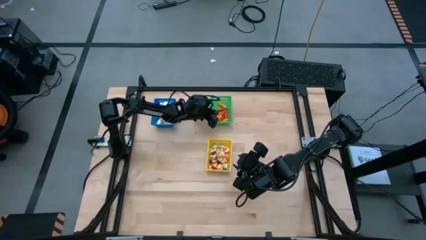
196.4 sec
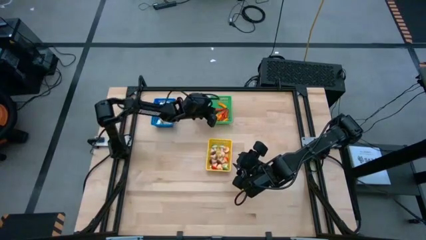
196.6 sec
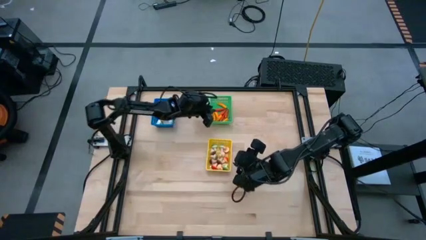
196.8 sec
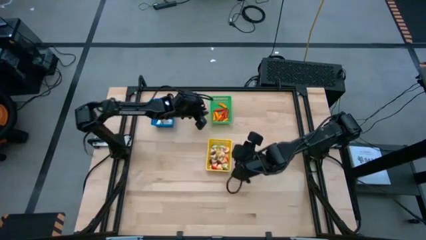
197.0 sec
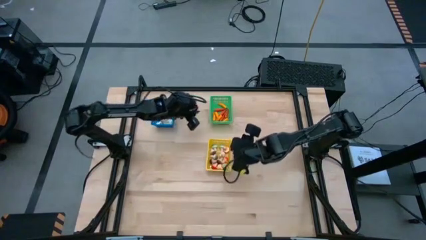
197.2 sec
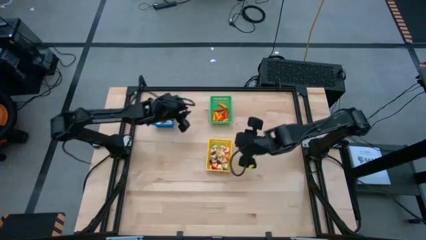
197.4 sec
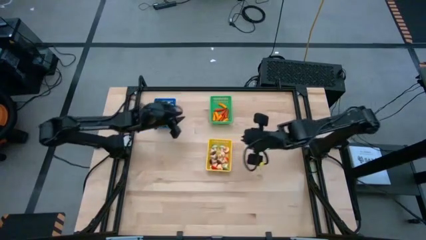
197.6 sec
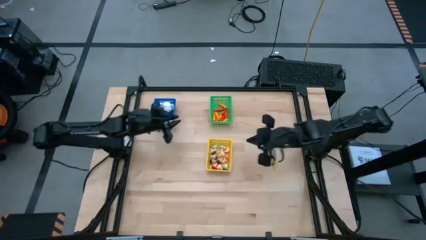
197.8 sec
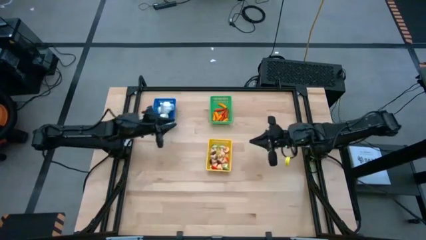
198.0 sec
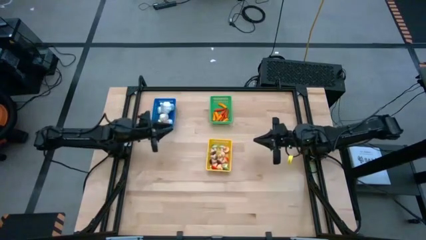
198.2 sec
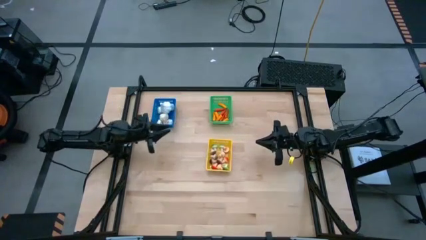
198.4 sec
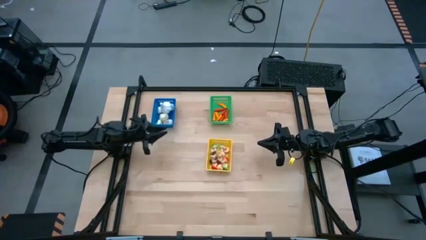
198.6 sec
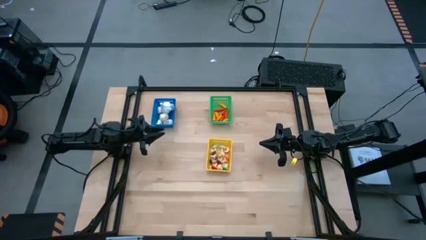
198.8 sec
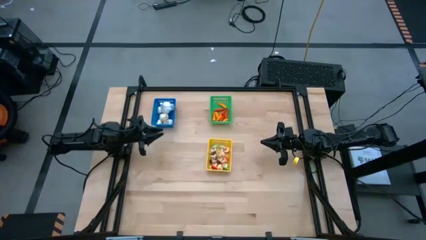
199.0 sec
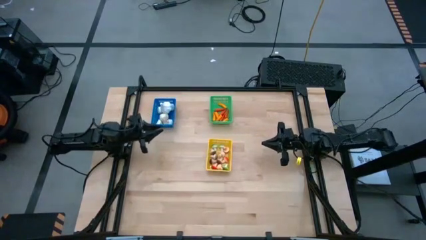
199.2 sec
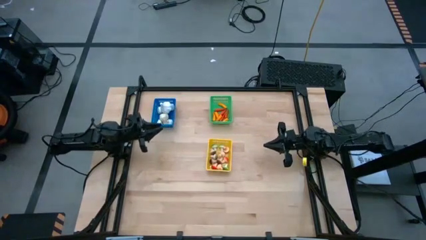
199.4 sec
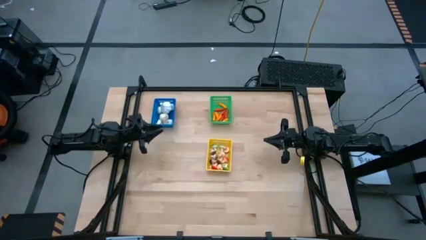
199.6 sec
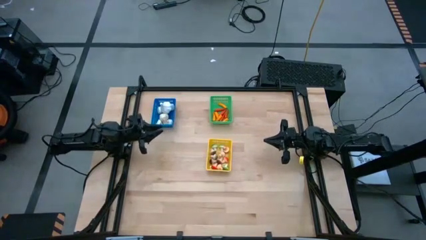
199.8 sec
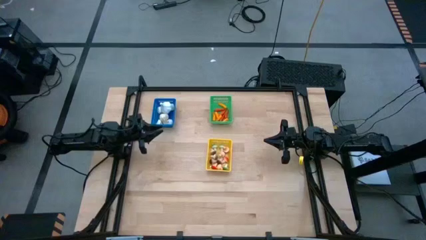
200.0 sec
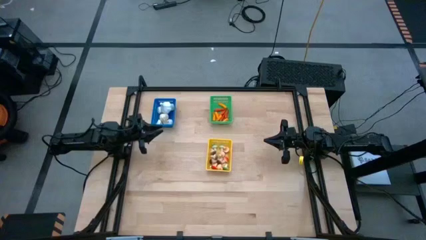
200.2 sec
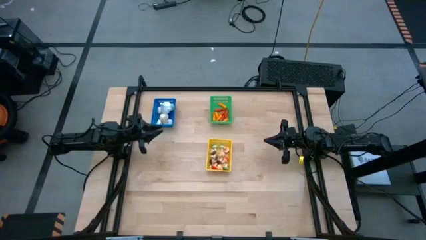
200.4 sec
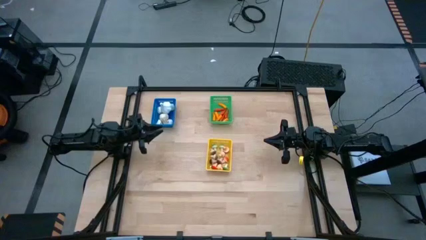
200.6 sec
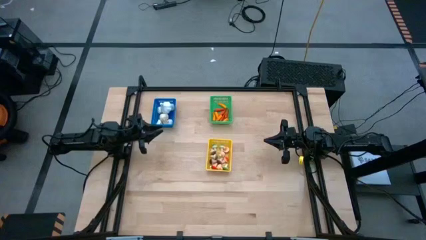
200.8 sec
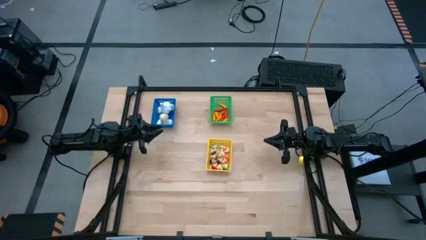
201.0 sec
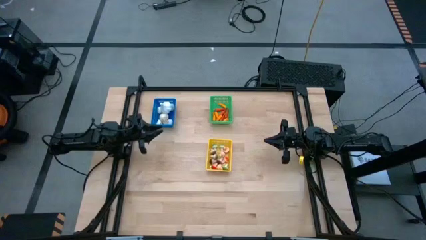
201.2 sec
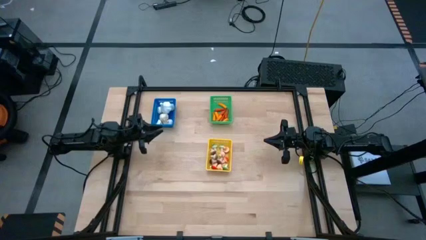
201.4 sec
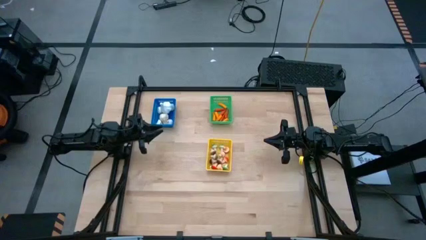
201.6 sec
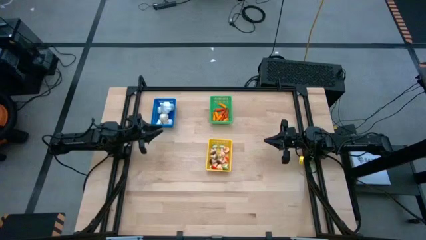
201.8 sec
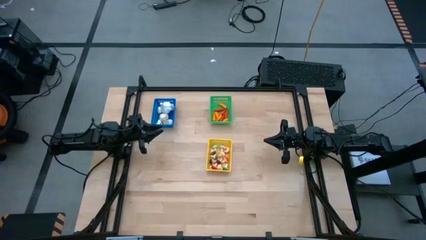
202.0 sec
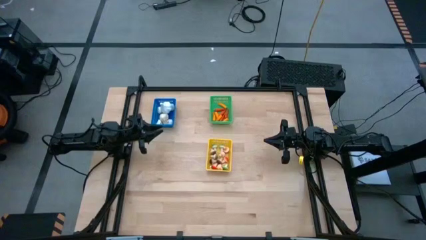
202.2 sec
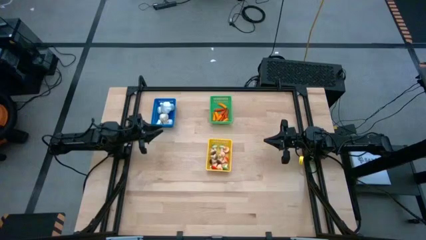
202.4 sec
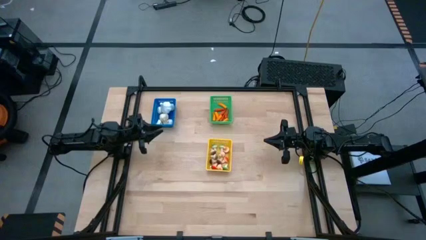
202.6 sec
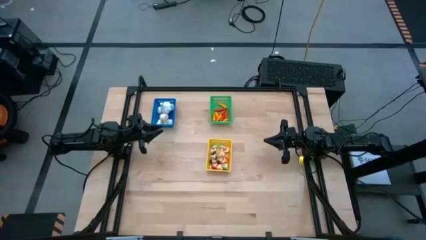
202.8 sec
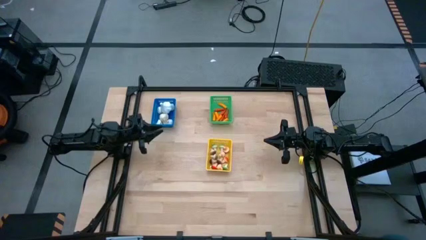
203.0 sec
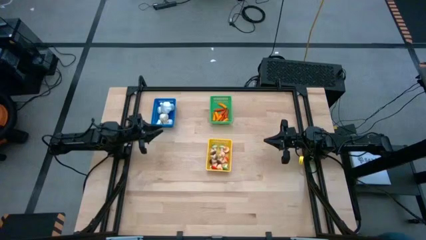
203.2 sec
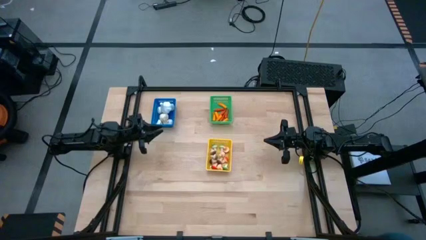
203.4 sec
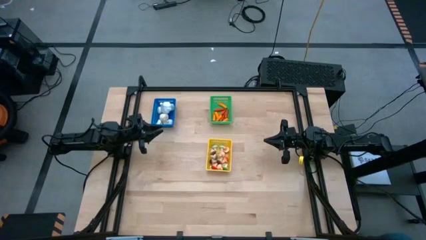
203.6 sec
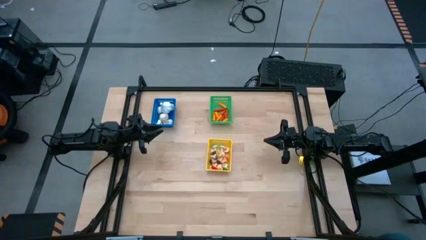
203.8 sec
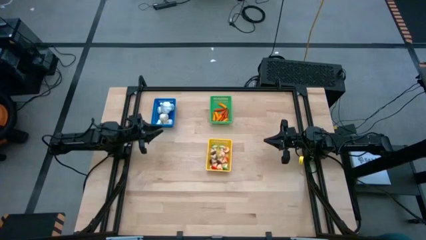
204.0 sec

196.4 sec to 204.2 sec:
Task: Sort produce into baskets
Return to Home Position

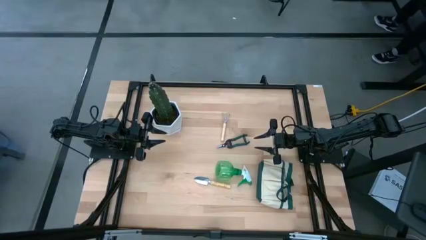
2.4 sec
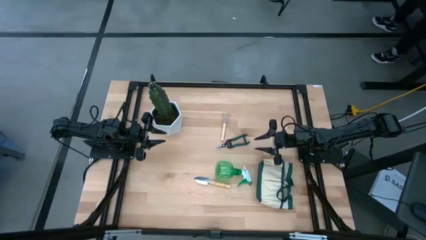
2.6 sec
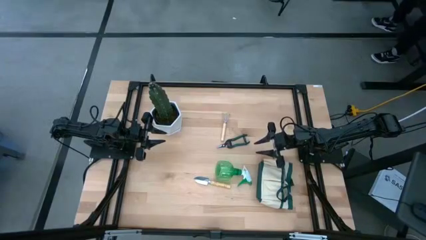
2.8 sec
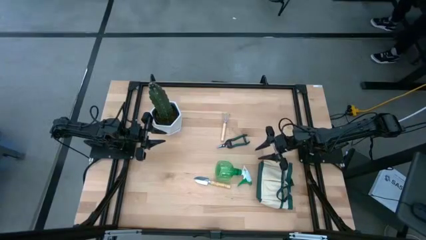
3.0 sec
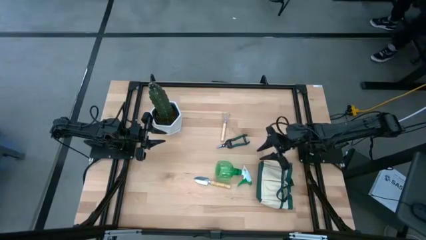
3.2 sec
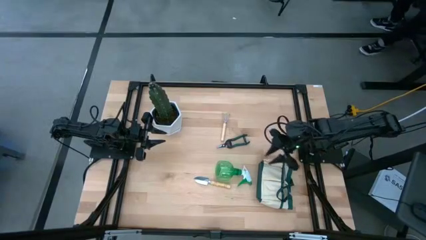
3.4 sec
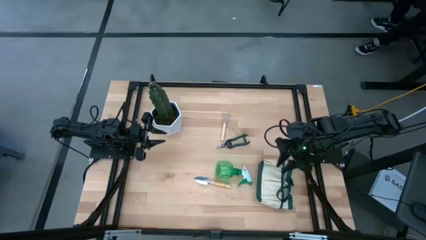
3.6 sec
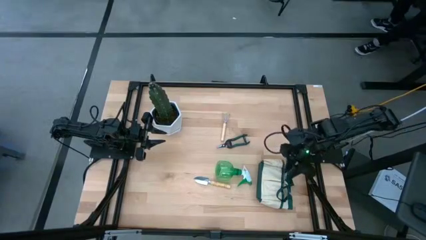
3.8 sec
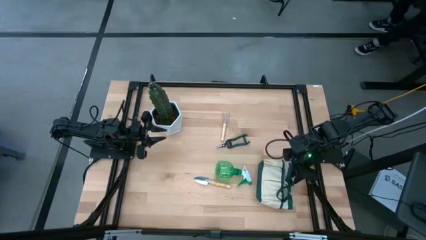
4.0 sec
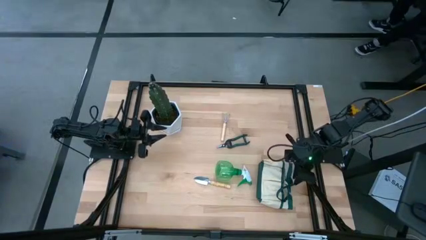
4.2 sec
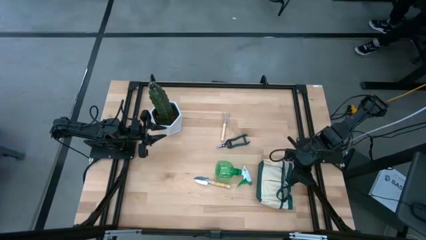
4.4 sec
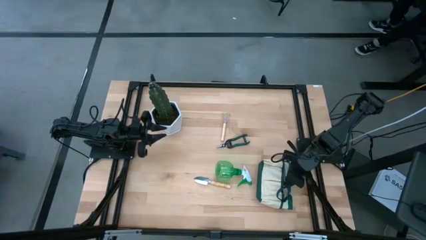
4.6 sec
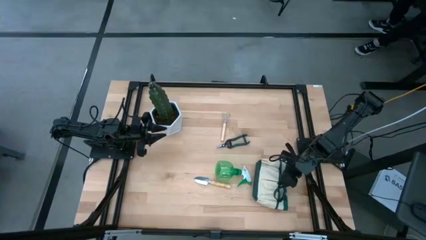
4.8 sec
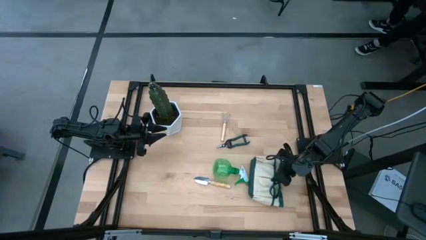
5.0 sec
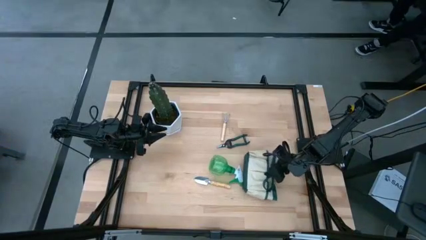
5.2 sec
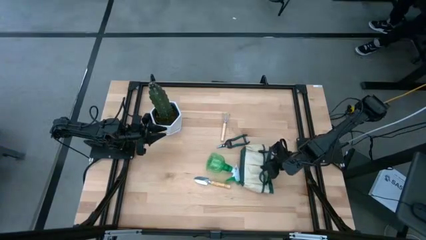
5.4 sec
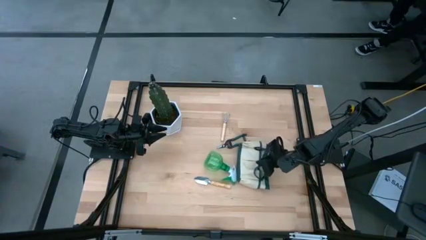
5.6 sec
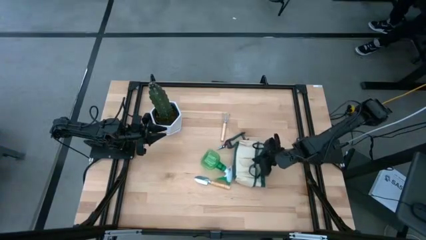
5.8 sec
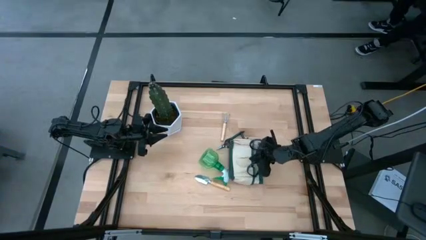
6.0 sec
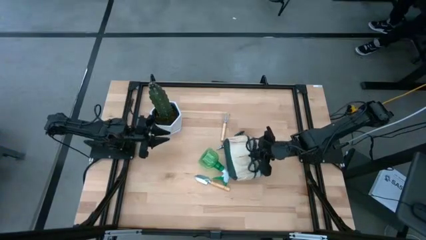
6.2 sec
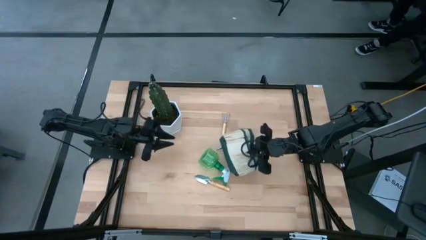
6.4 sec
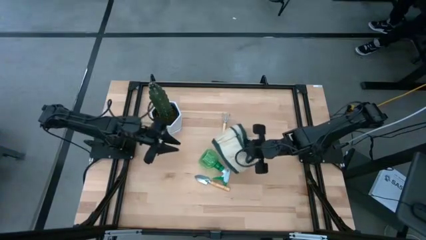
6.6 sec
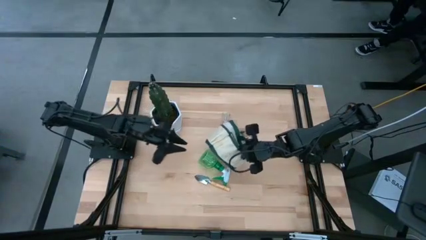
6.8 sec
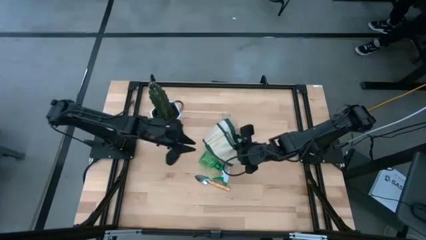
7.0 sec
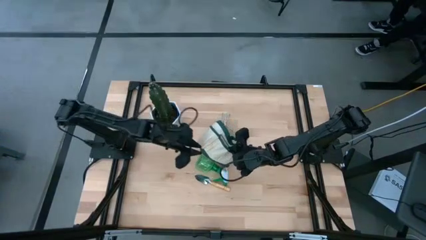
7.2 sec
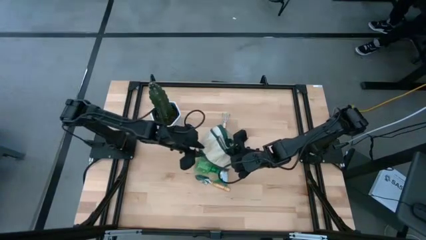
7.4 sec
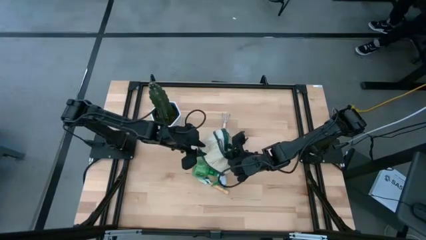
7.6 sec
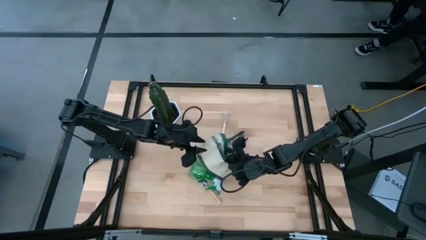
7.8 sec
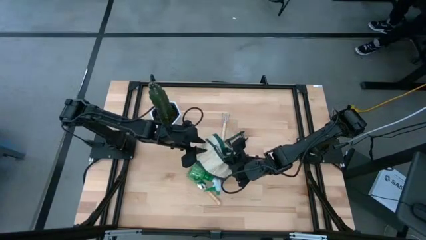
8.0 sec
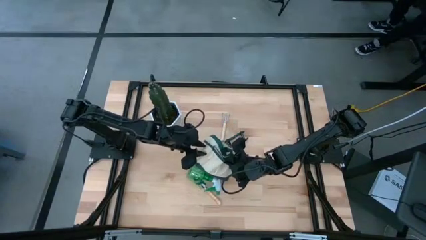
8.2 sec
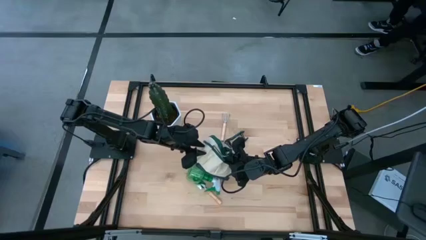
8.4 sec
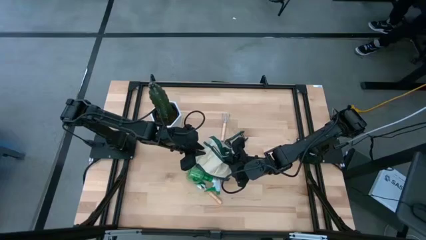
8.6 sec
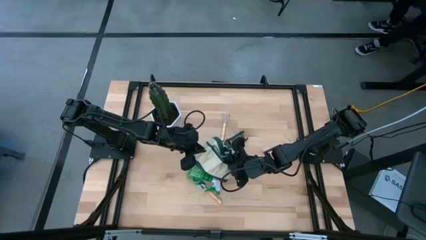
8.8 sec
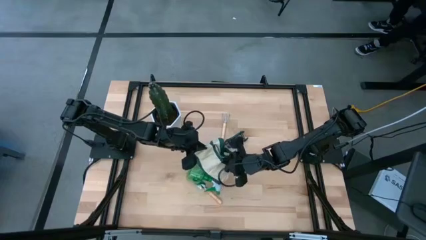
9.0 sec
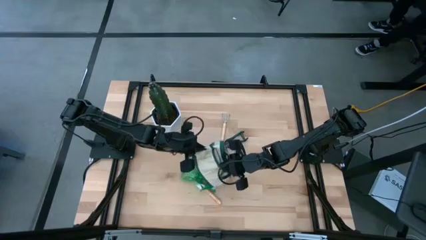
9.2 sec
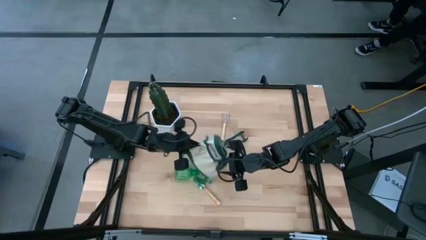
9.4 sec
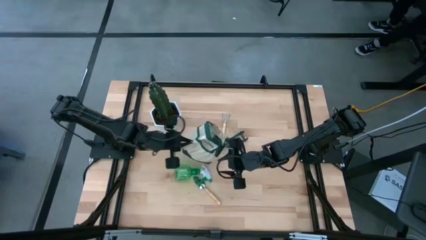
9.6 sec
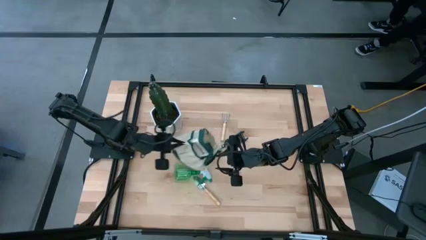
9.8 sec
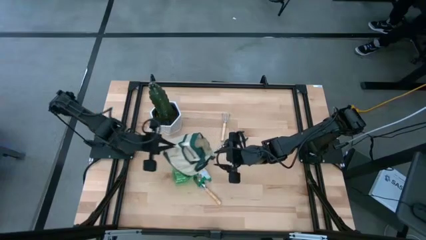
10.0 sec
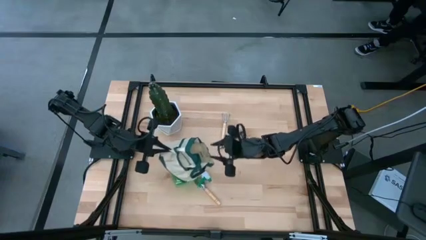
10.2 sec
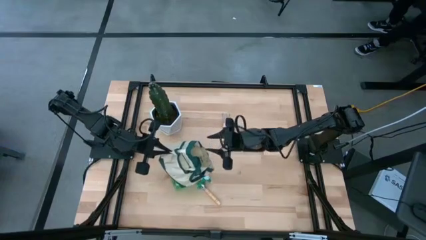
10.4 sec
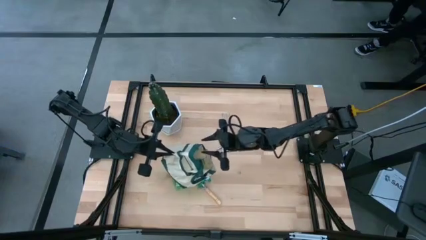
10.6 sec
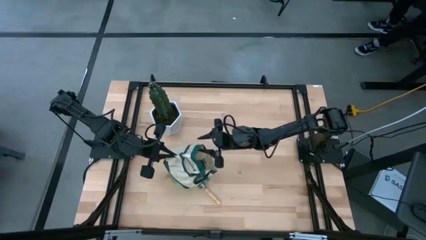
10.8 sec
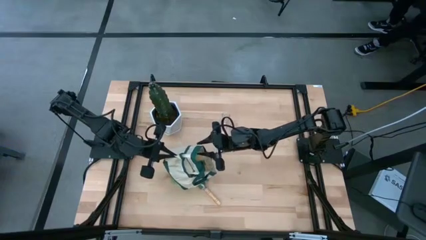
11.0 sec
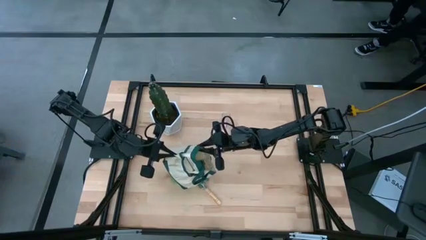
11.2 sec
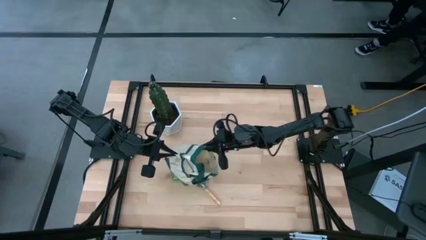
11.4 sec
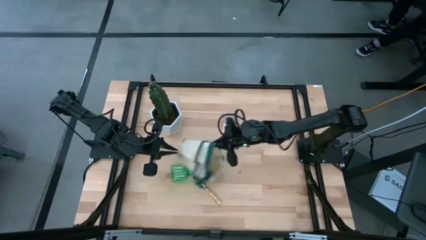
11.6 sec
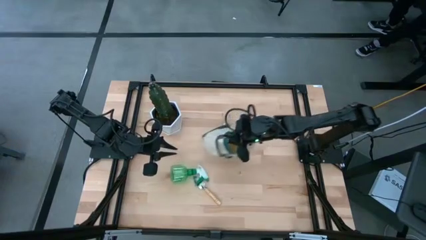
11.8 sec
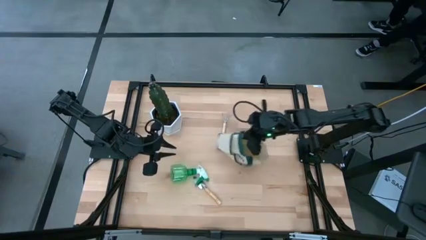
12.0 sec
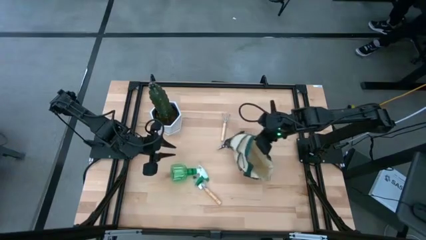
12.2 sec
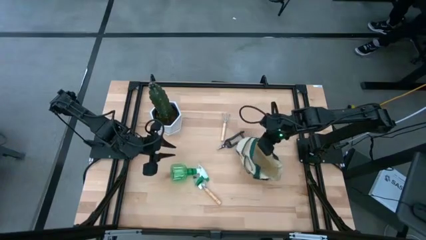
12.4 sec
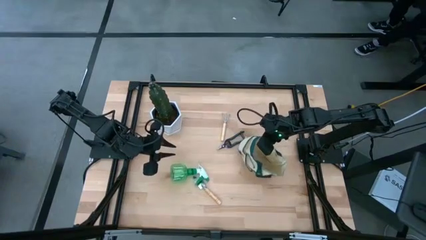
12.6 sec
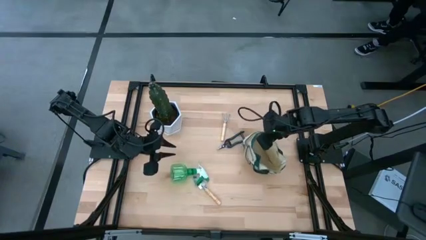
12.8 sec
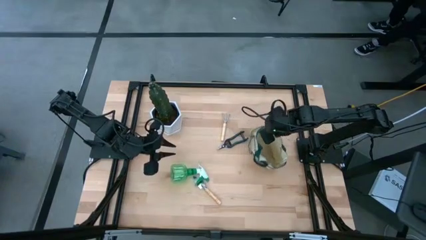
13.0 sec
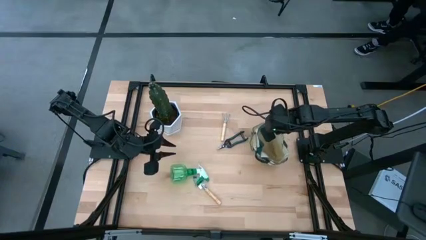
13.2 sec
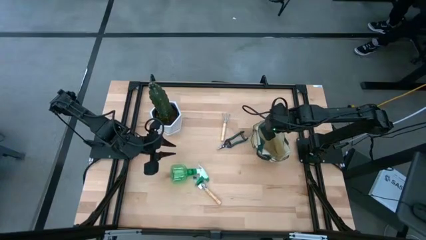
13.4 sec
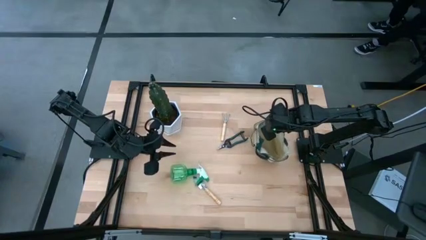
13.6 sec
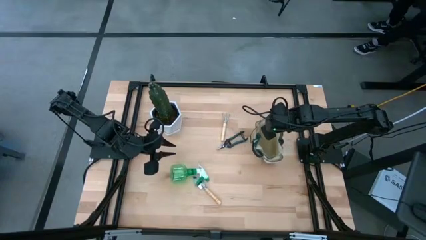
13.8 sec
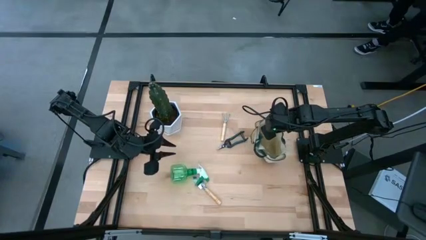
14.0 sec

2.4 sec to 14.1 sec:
Task: Pick & Place Garden tools in Gardening bag
Prepare the gardening bag
